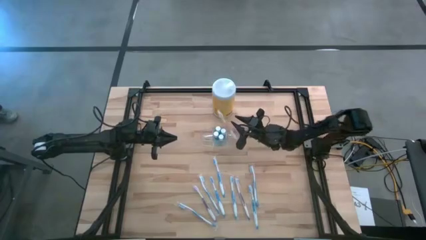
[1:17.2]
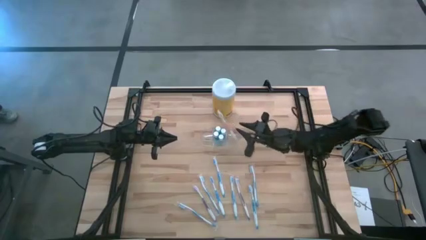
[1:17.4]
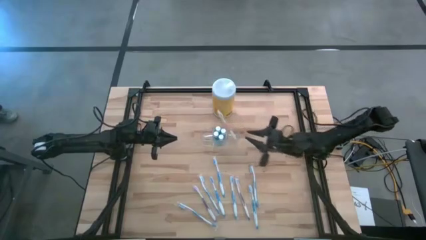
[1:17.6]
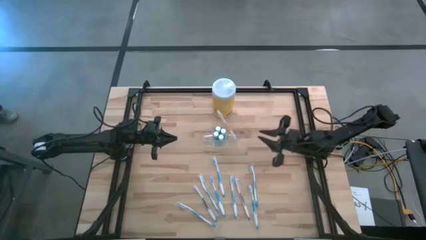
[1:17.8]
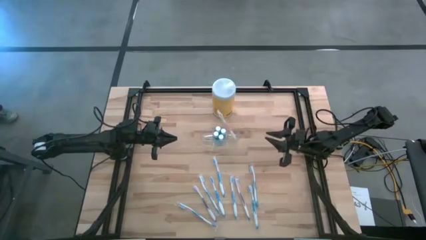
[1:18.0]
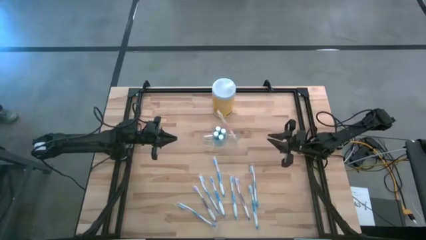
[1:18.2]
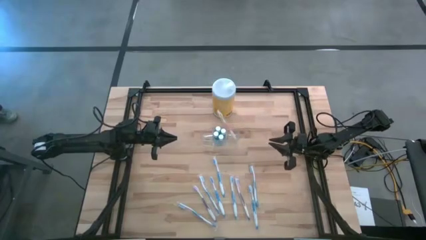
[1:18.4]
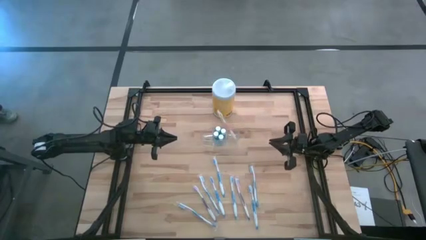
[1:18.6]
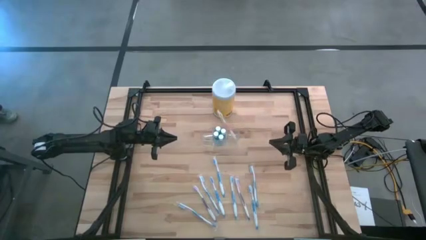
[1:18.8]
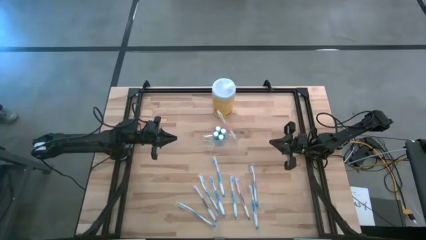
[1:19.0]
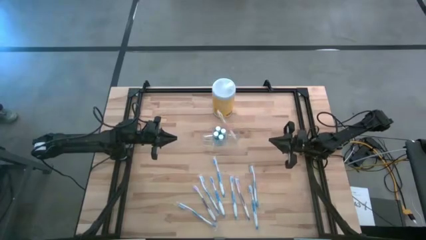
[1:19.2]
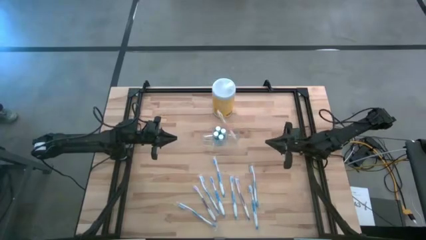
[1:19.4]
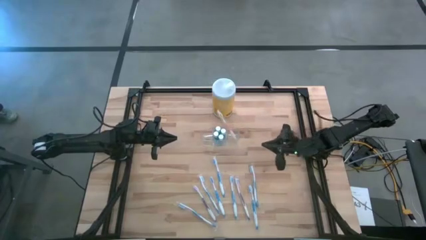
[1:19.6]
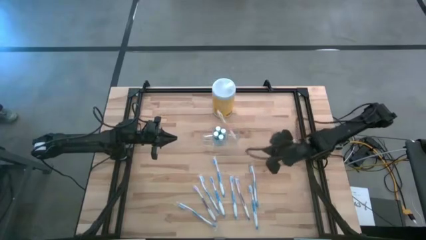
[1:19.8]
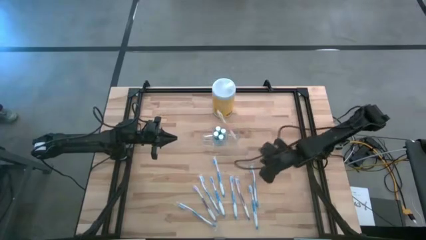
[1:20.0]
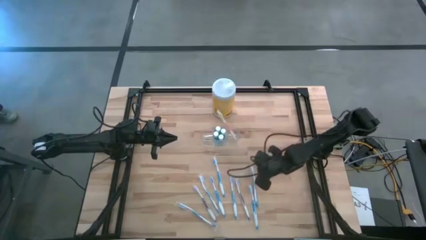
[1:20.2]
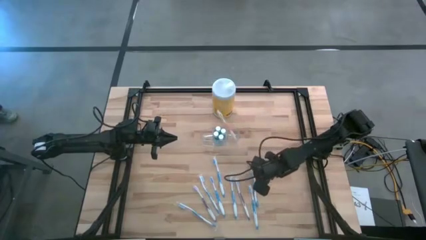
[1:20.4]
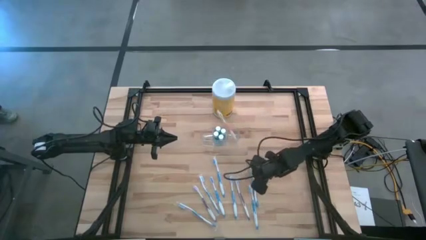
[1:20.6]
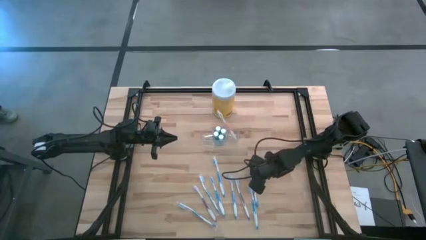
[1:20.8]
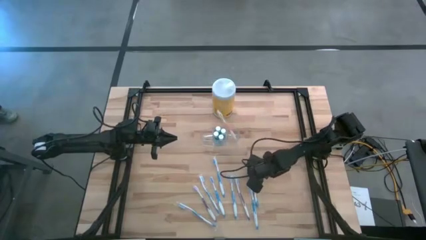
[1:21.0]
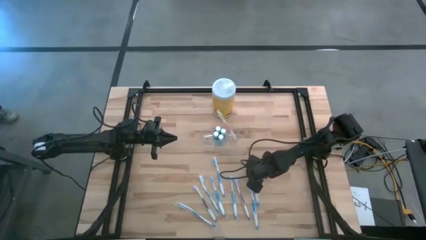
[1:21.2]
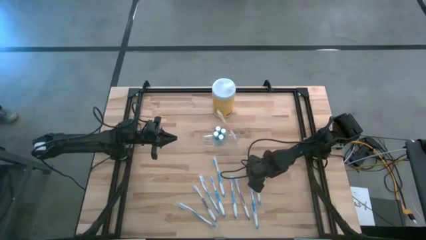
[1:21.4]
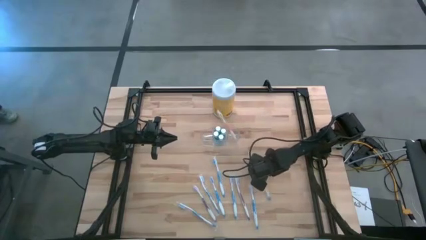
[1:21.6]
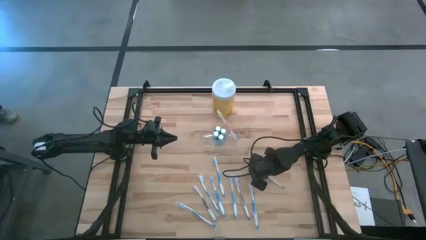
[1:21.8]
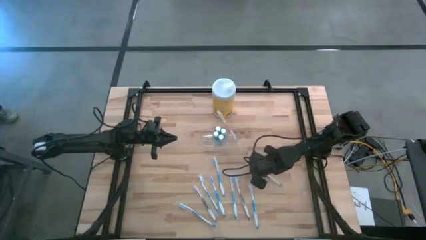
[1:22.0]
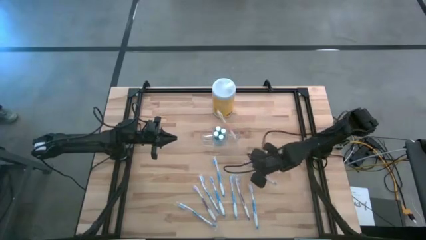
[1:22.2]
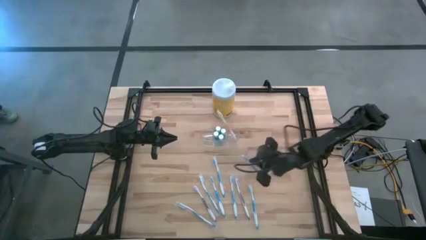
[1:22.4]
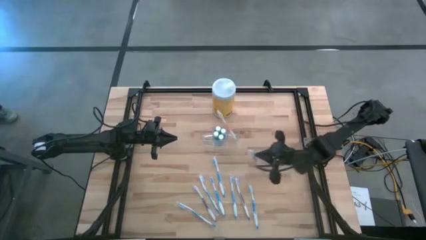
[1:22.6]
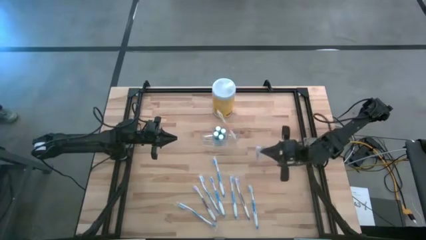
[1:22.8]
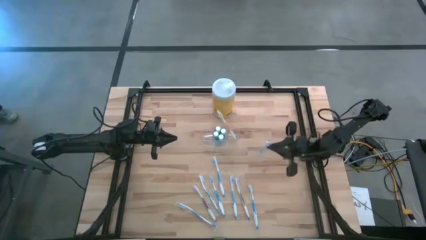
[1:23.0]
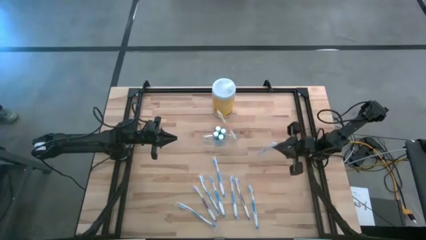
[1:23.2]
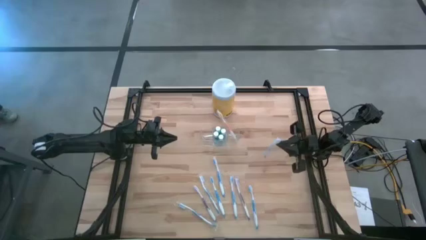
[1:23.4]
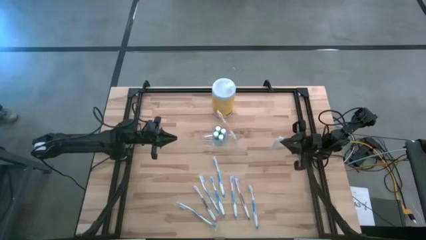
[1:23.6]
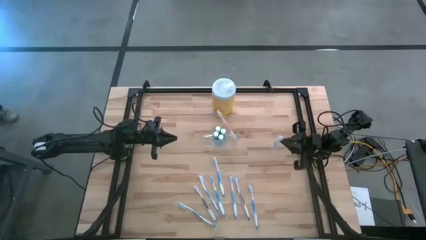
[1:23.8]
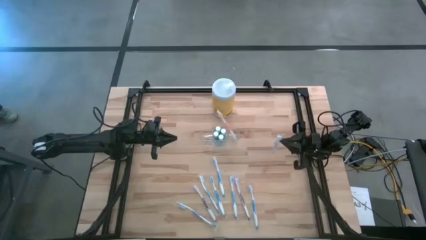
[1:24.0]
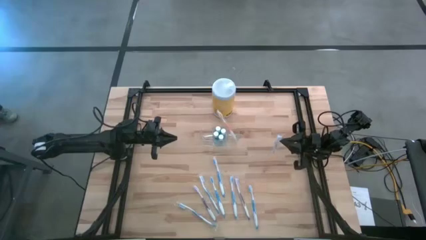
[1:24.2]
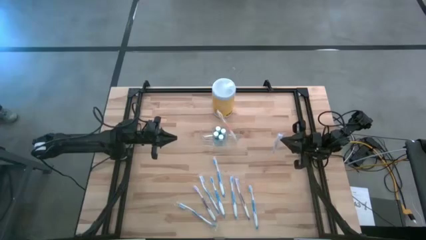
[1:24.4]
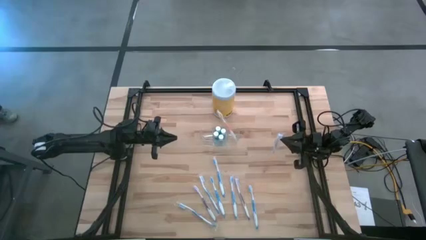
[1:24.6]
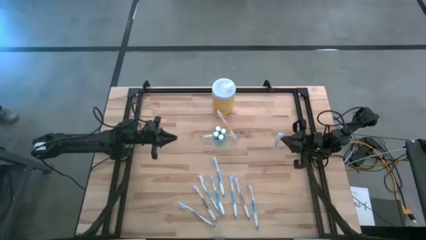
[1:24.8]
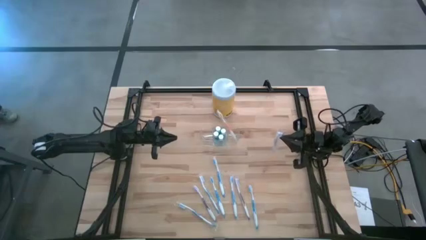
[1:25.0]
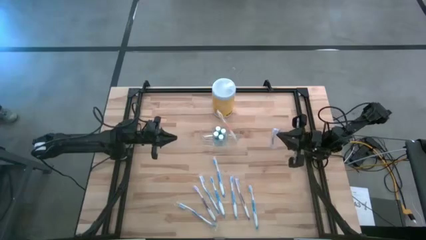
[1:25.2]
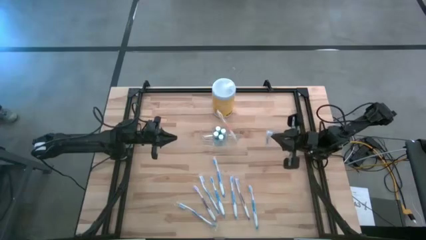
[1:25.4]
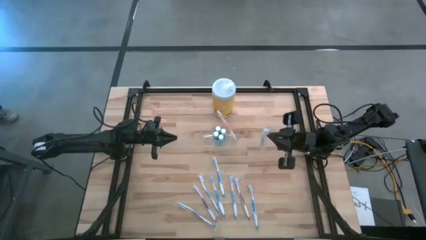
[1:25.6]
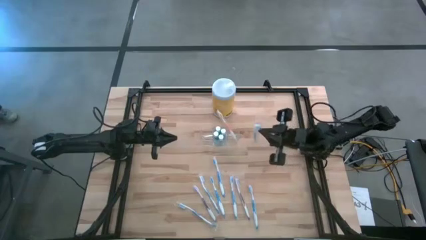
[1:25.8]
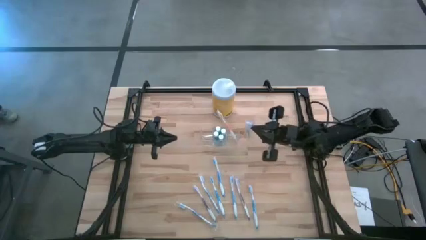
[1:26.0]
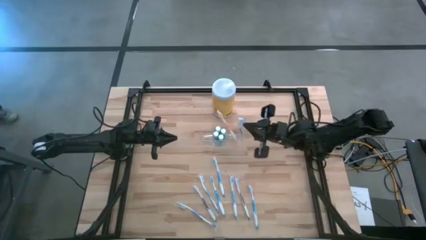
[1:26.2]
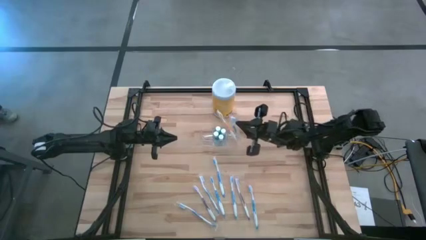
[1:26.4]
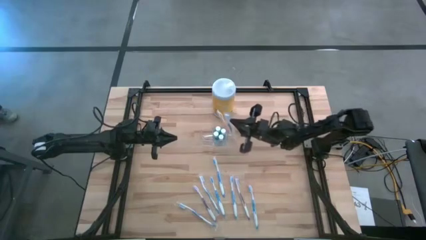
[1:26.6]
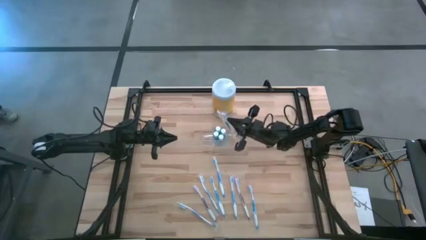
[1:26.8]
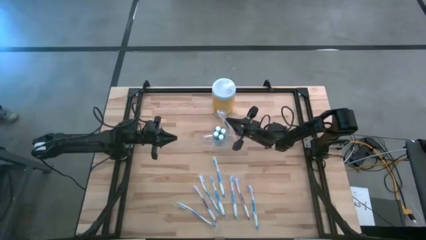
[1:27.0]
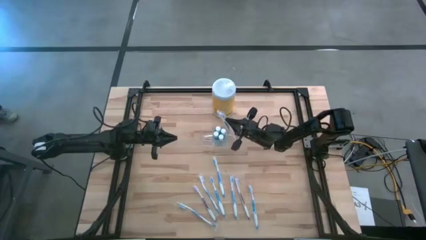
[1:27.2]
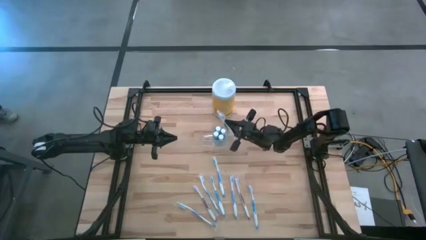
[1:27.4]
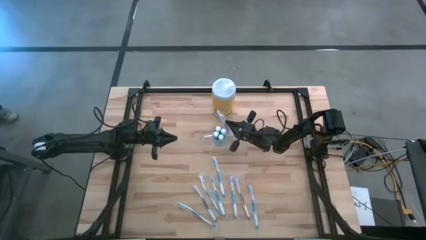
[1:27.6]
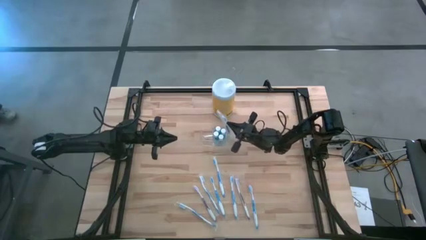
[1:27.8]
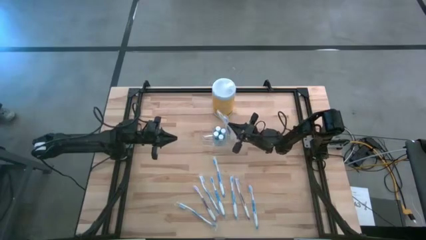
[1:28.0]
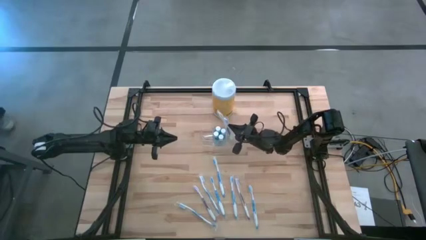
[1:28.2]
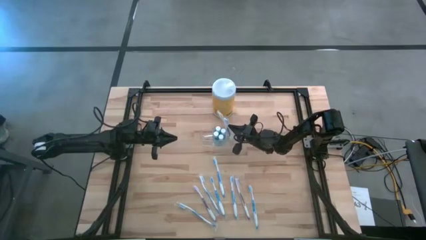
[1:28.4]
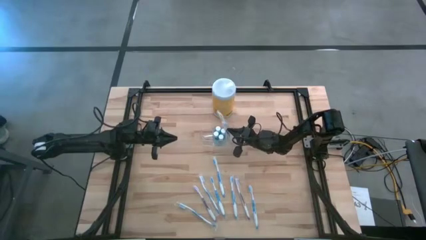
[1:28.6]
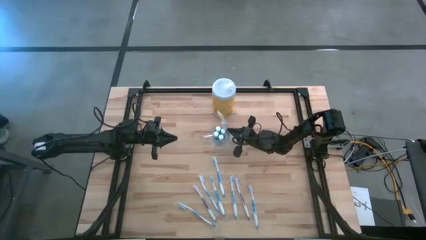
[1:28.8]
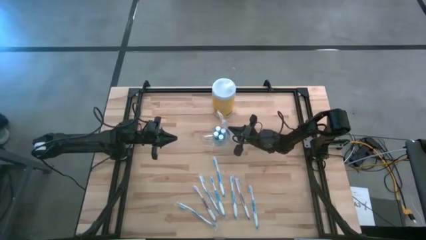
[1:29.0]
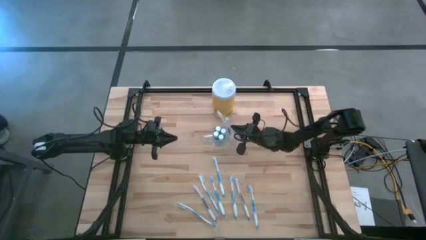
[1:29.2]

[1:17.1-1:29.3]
Task: Pick & Place toothbrushing station
Put the blue toothbrush into the transparent organizer
